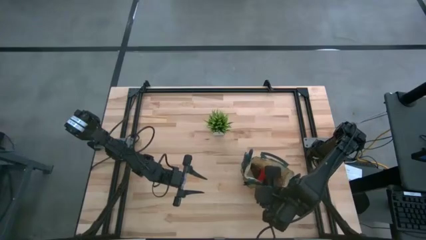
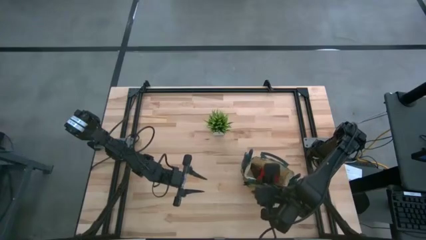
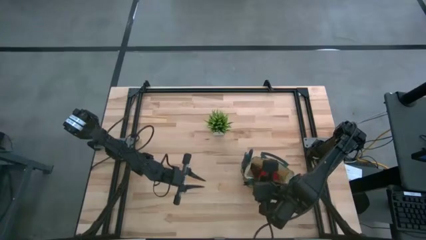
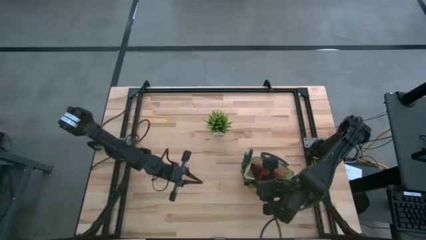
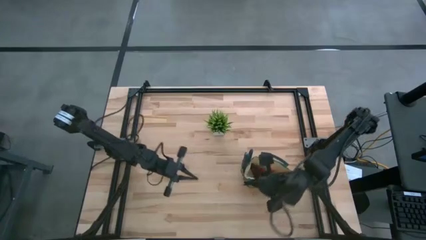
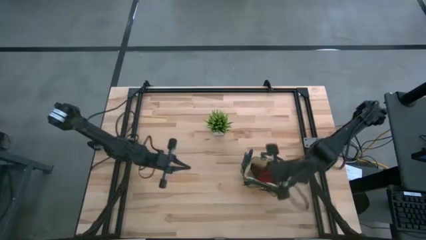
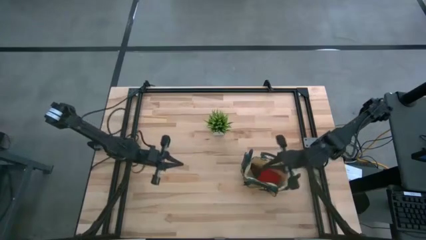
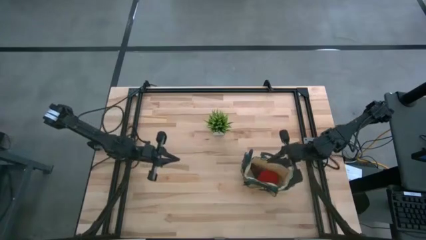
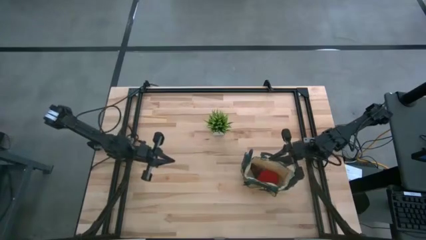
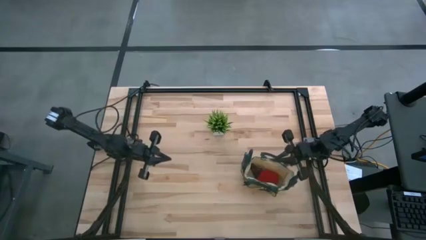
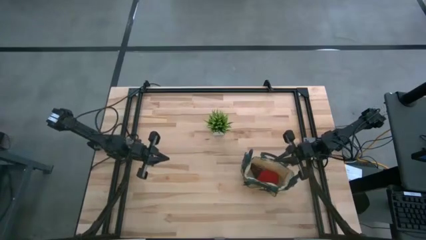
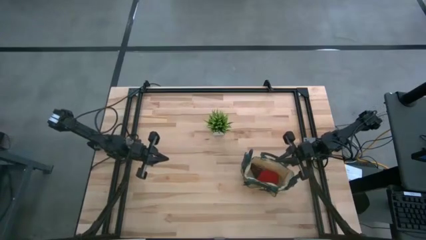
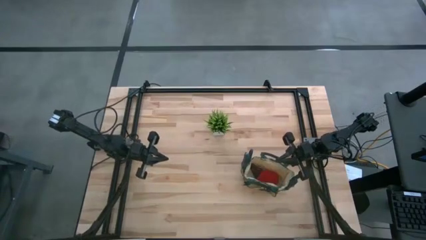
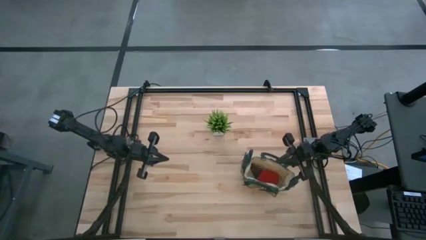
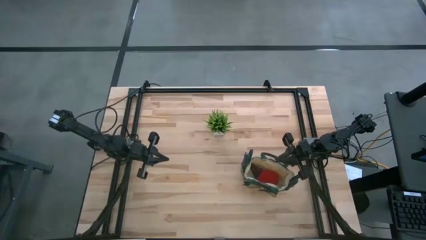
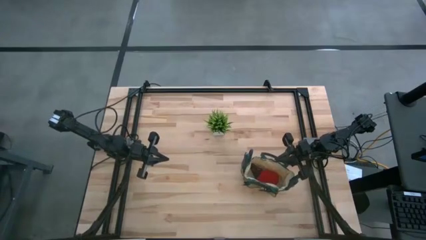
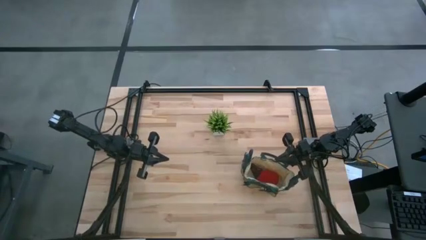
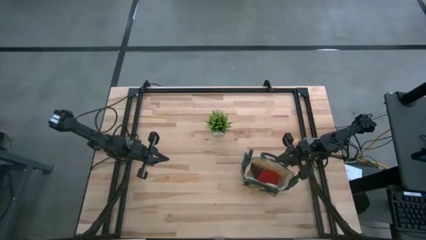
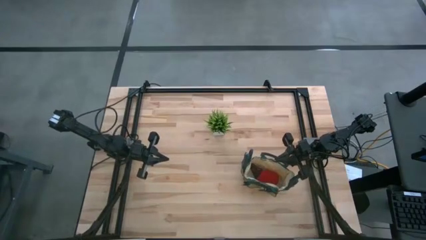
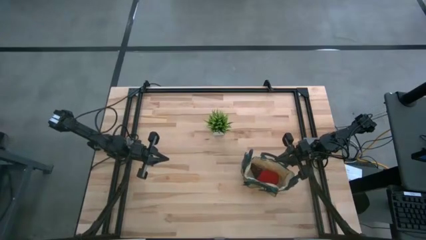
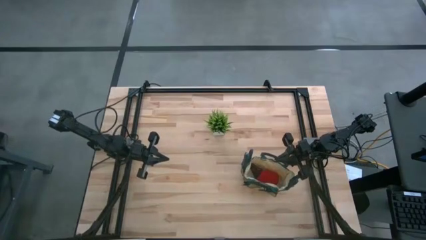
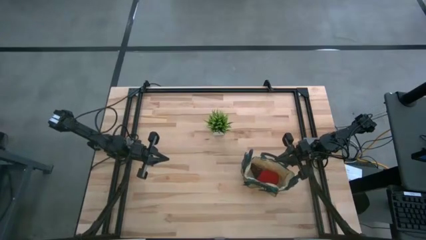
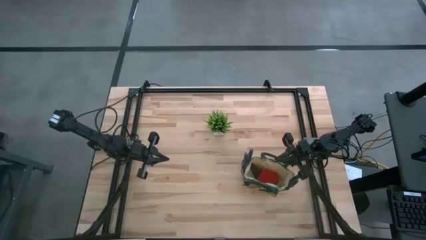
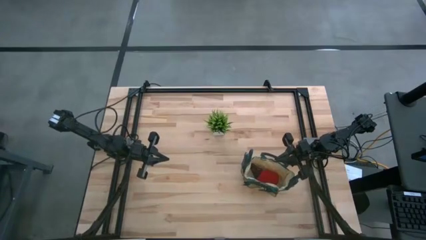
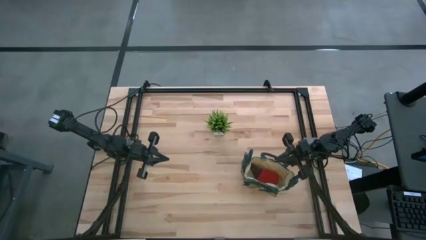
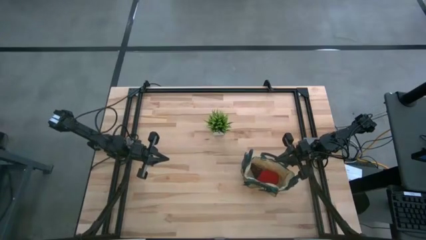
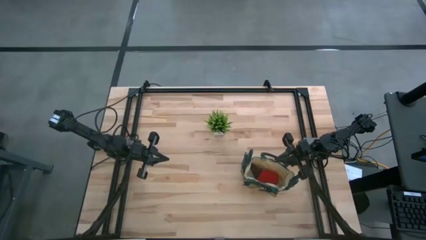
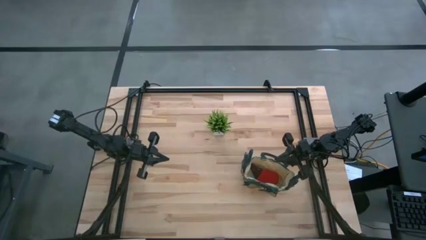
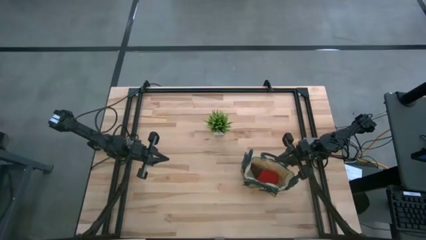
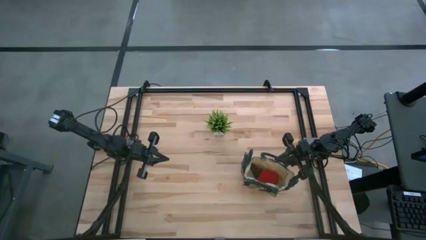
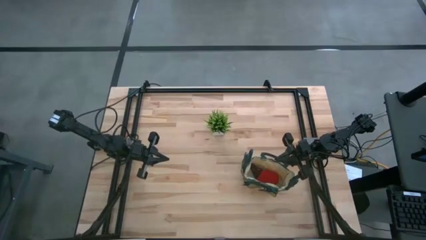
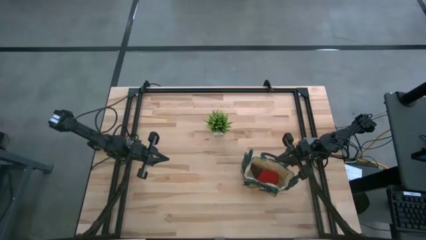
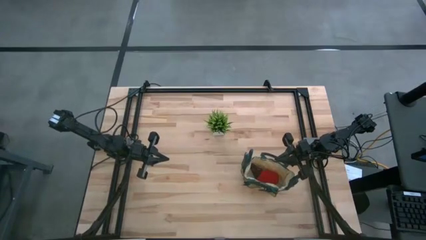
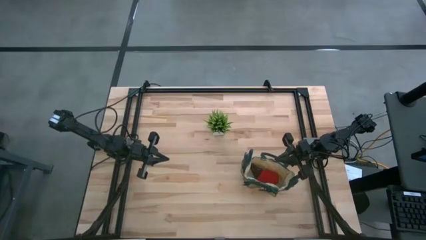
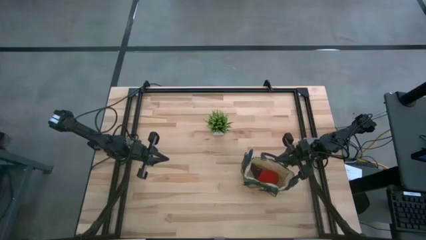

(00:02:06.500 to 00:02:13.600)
Task: Pick & Place Garden tools in Gardening bag
Return to Home Position

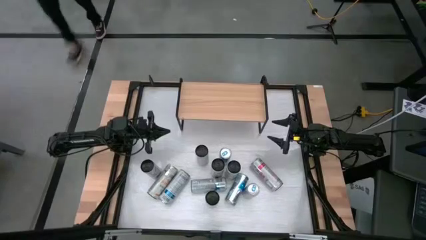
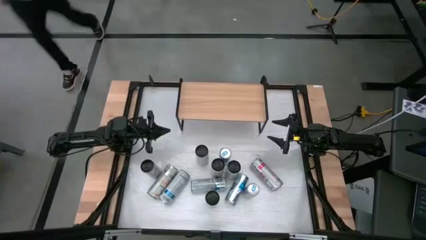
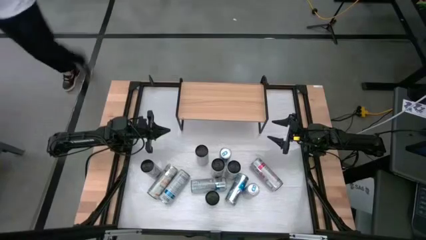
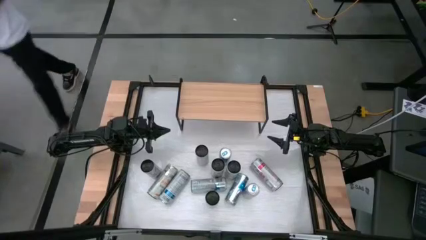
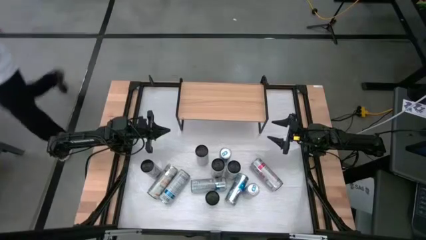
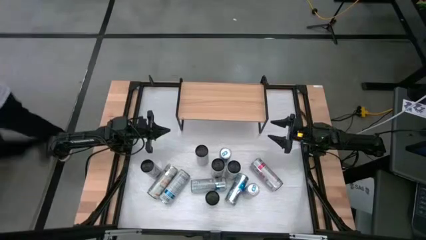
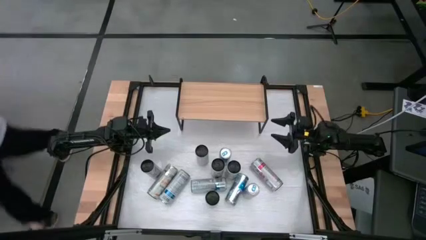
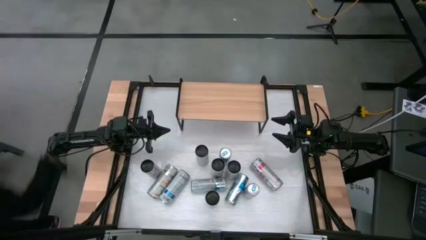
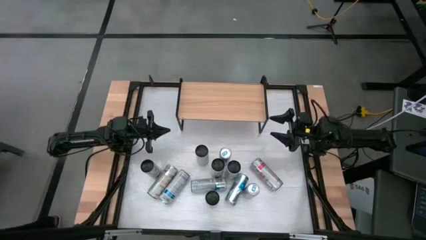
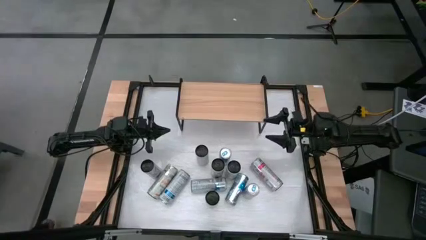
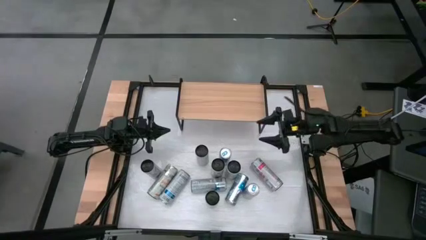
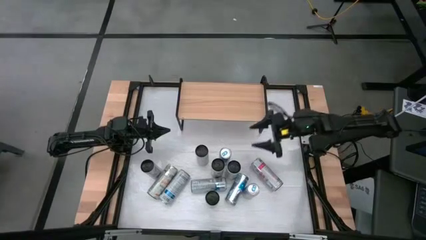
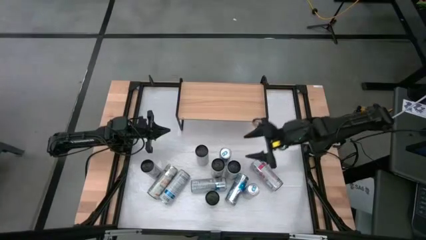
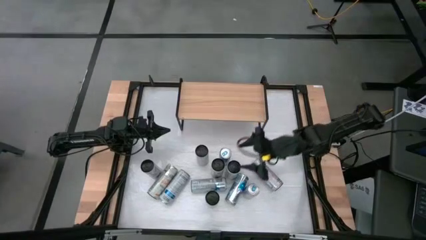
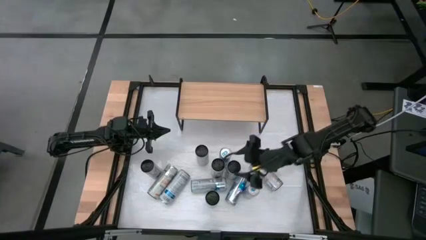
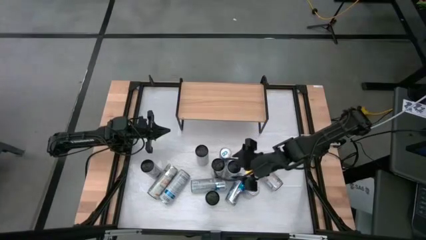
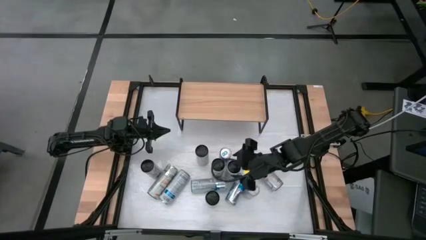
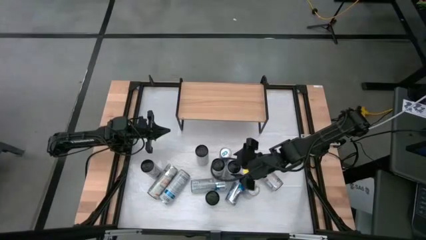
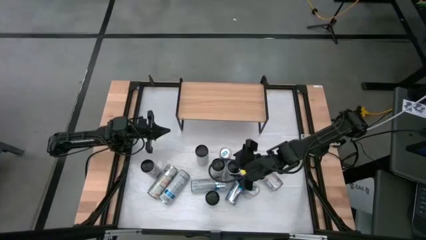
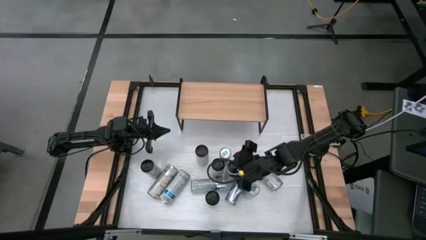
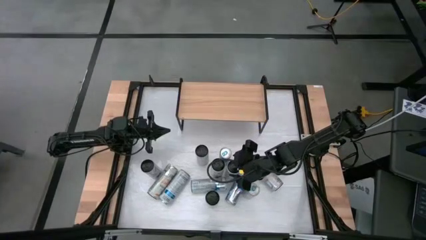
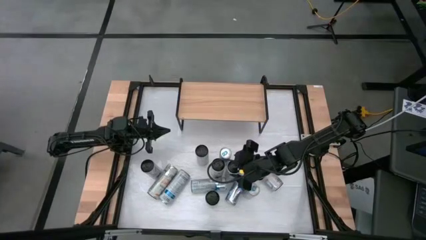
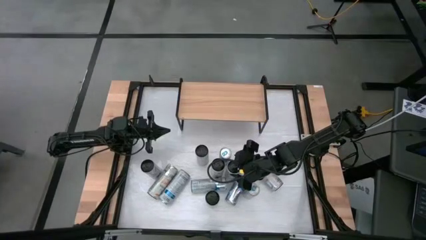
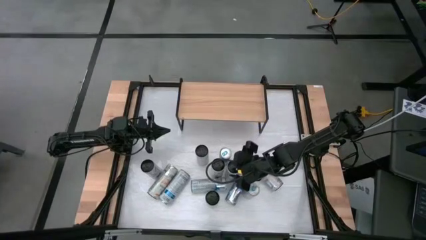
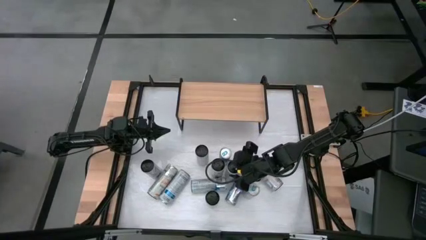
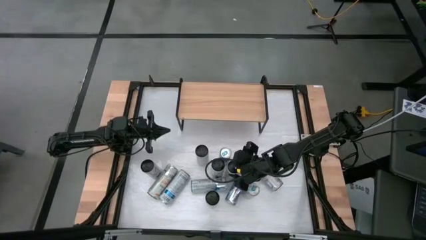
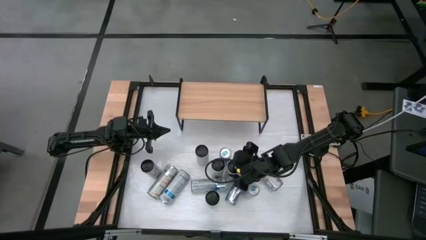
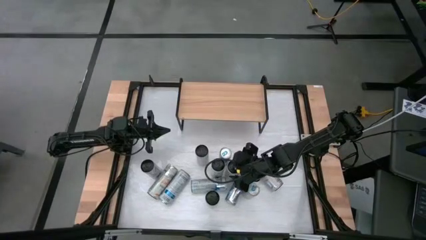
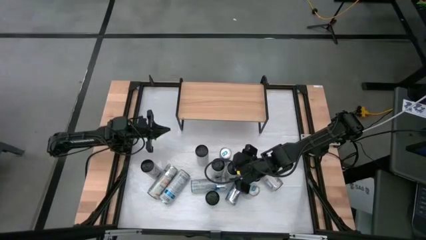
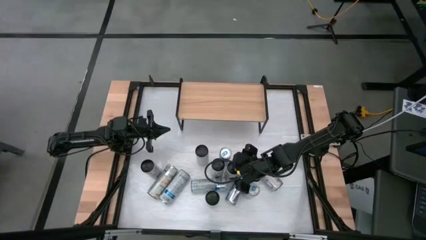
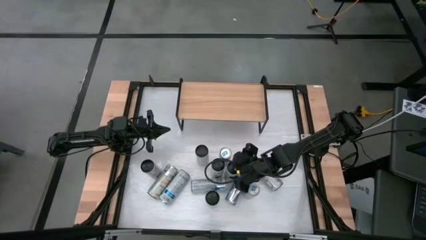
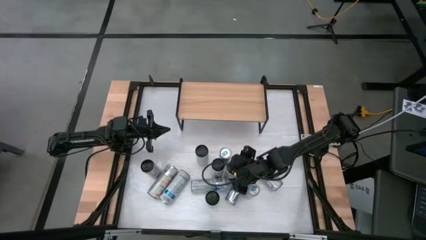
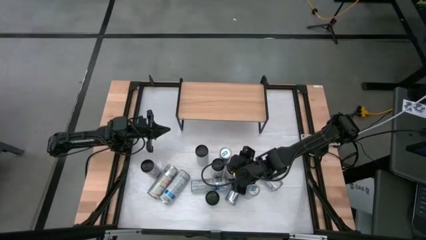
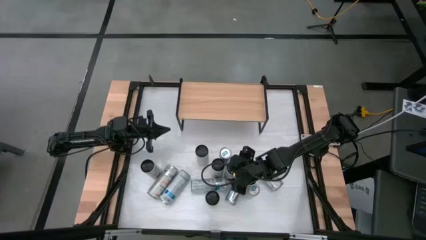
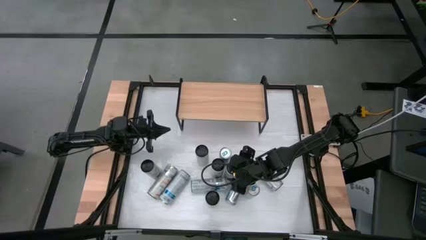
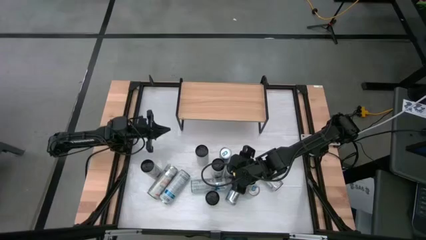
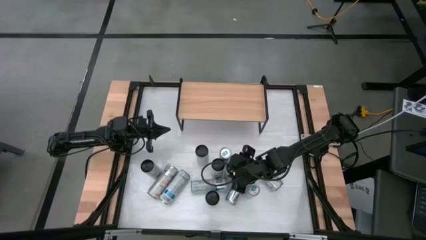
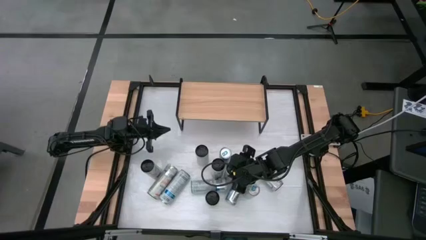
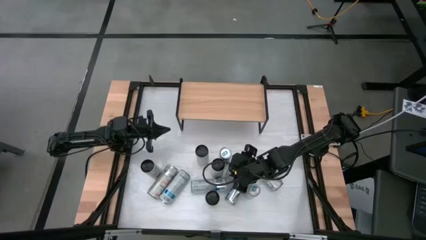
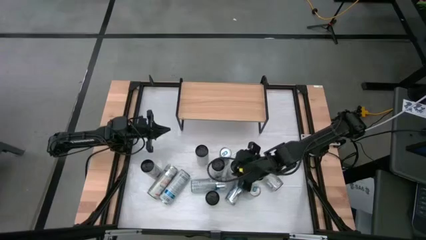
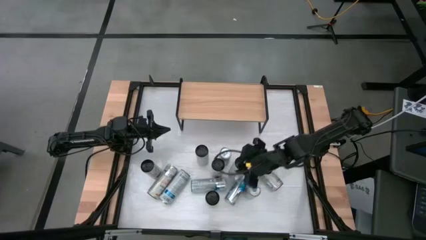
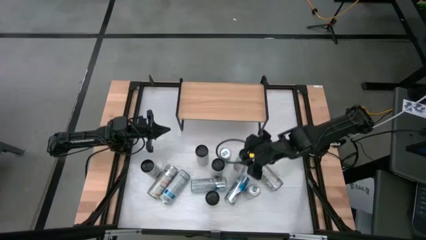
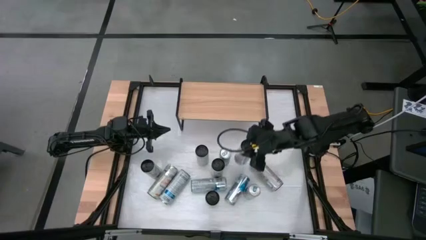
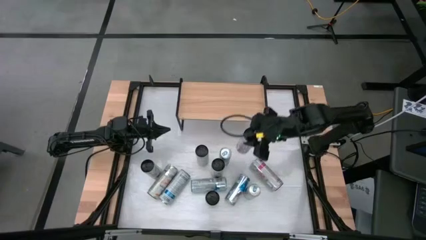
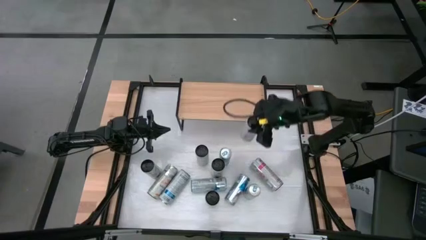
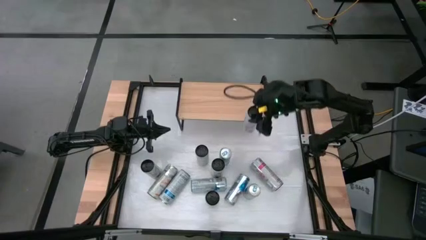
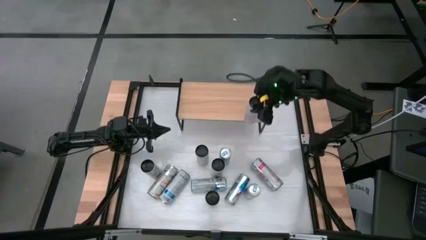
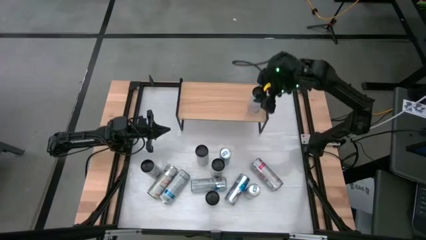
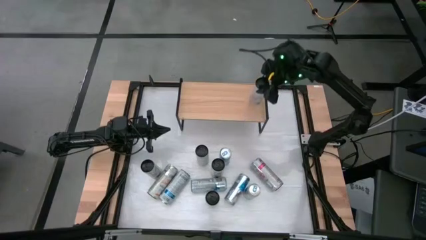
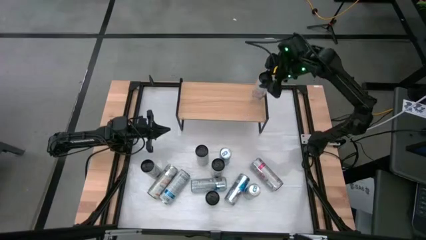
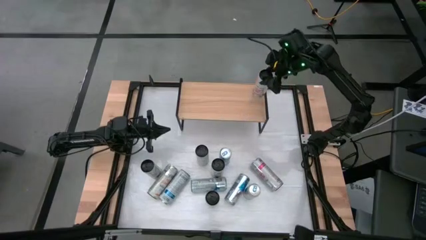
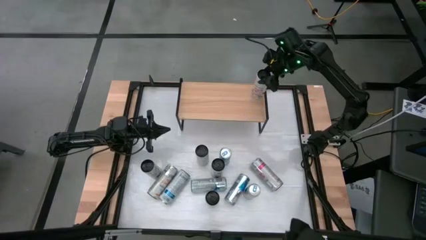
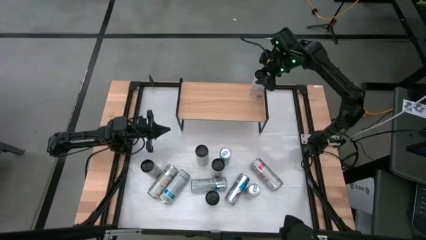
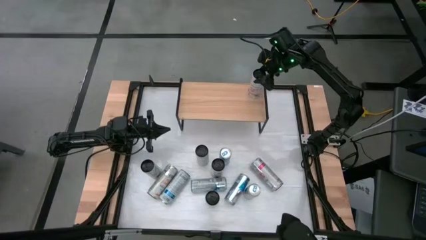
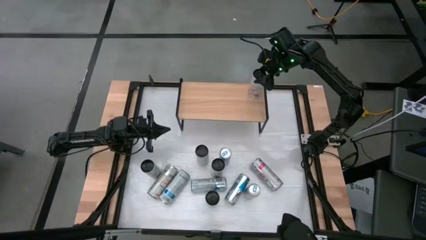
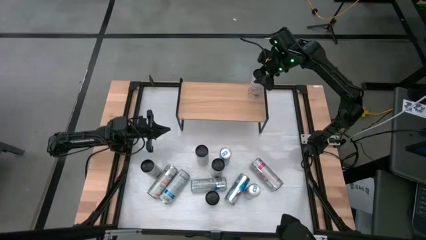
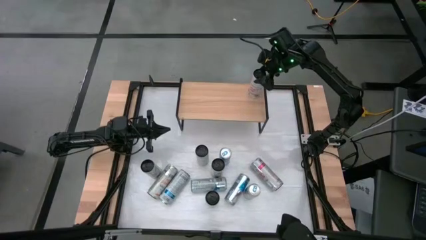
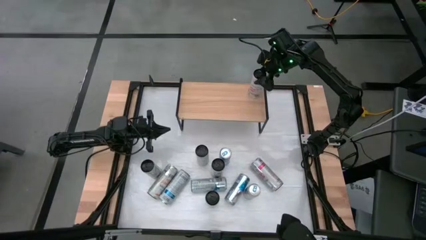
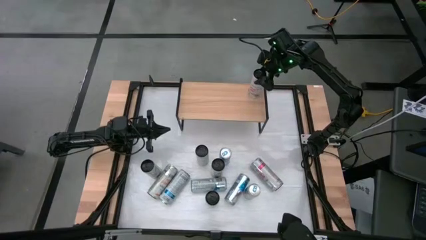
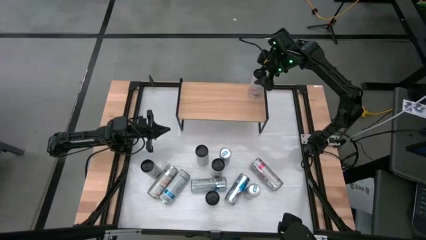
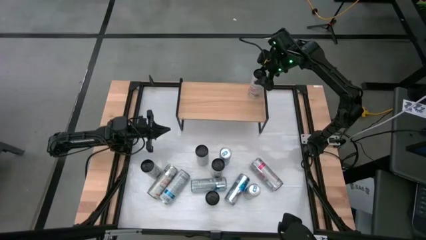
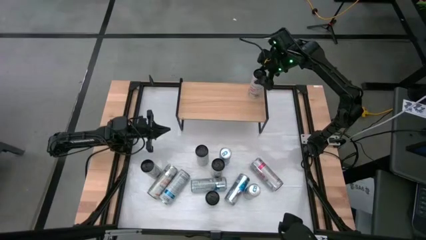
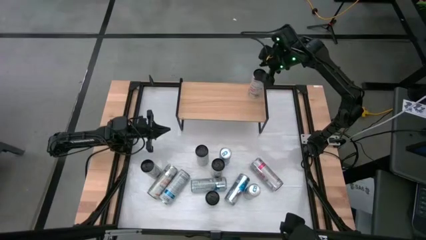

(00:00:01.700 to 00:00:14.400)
Task: Sort soda cans
Put the middle white pink soda can on the shelf
